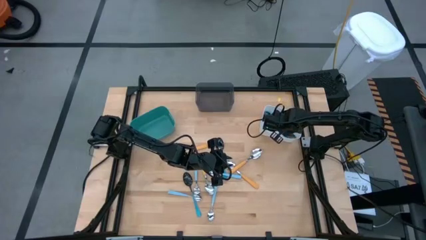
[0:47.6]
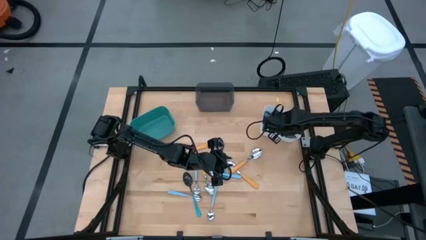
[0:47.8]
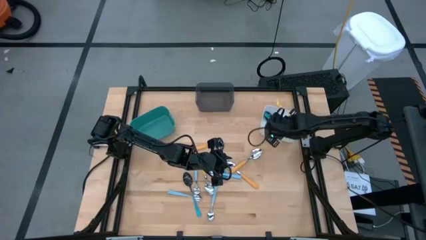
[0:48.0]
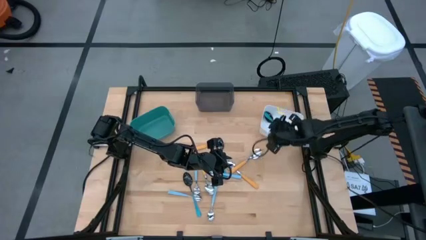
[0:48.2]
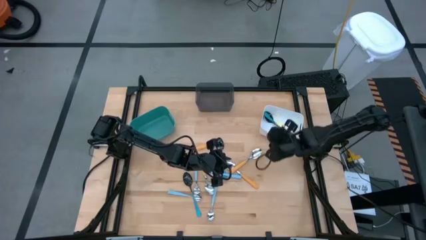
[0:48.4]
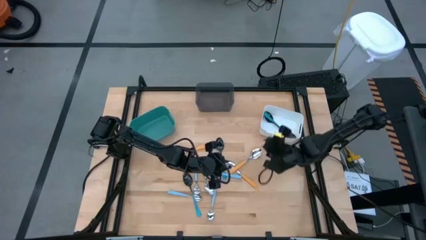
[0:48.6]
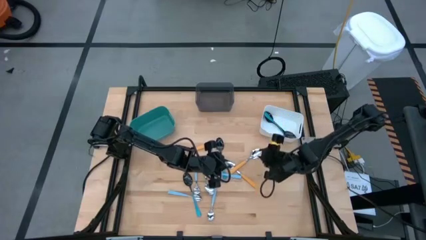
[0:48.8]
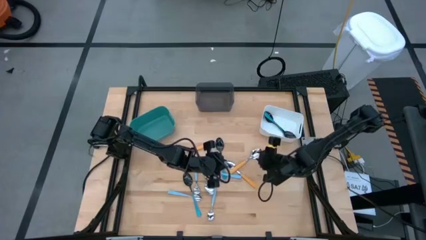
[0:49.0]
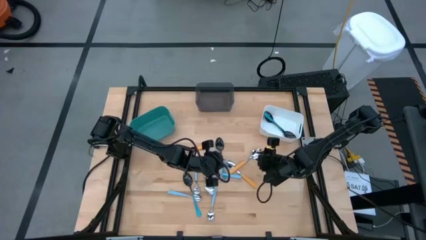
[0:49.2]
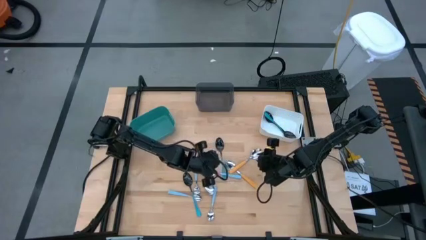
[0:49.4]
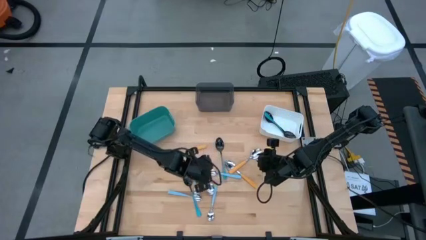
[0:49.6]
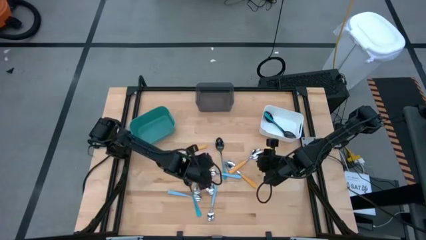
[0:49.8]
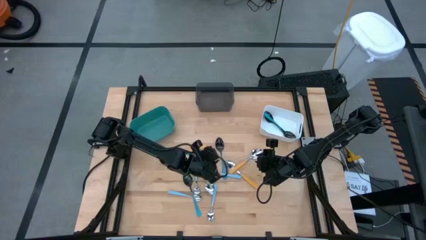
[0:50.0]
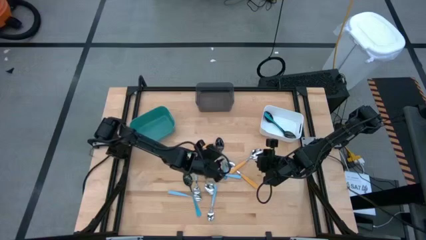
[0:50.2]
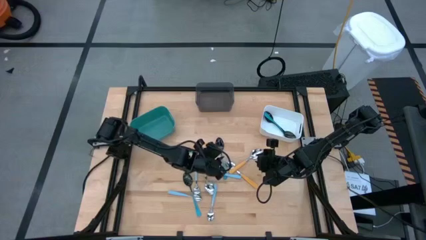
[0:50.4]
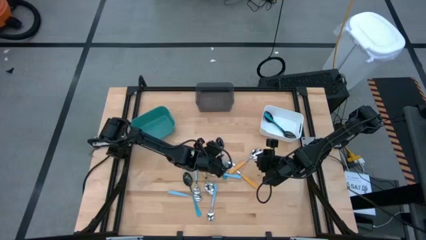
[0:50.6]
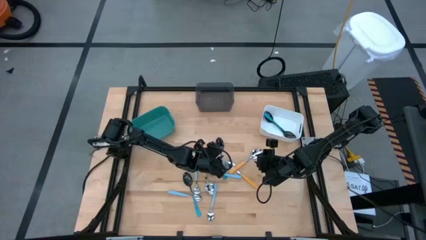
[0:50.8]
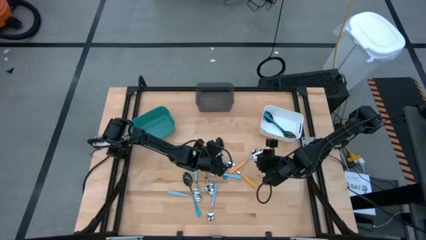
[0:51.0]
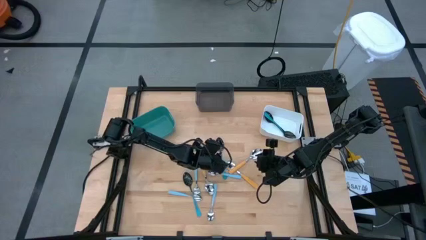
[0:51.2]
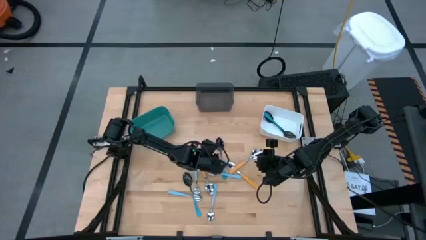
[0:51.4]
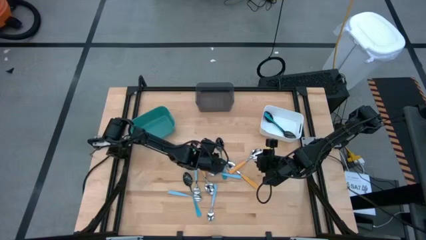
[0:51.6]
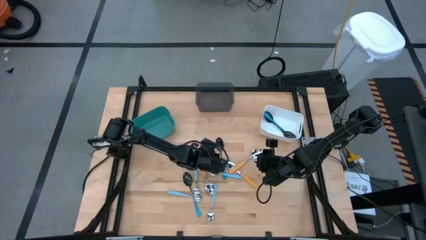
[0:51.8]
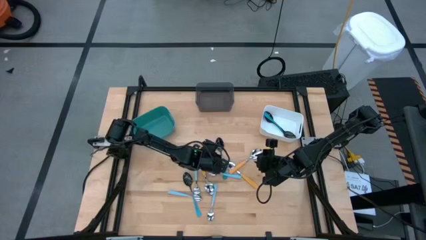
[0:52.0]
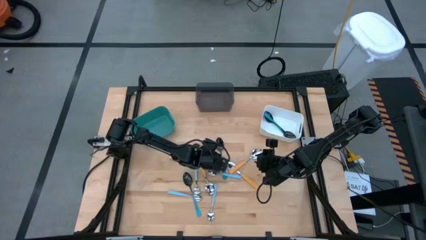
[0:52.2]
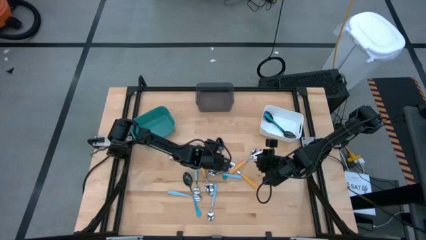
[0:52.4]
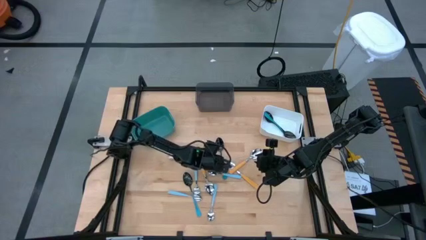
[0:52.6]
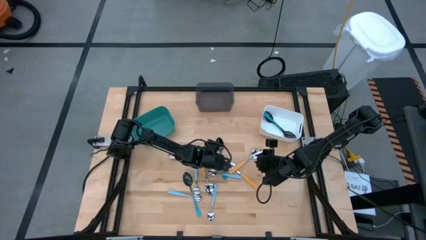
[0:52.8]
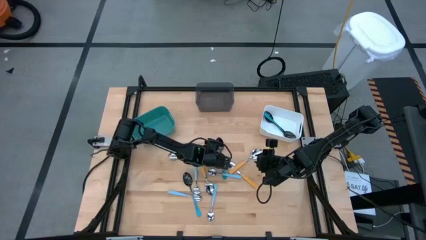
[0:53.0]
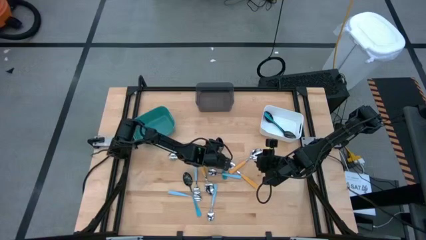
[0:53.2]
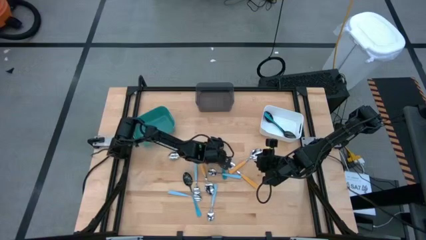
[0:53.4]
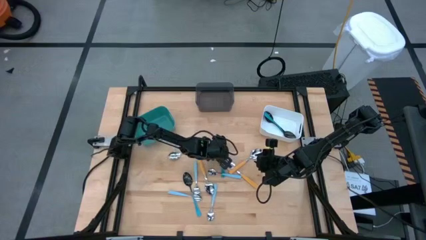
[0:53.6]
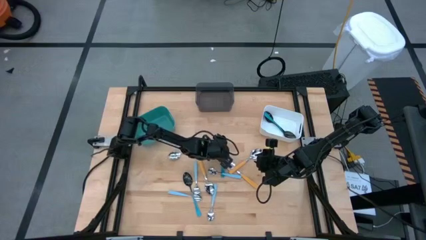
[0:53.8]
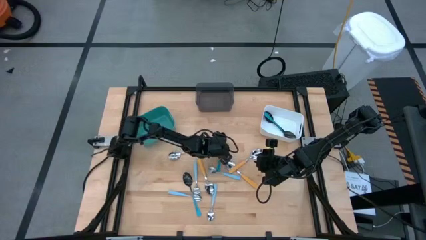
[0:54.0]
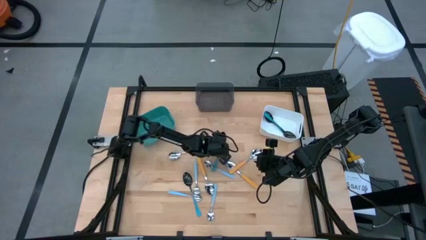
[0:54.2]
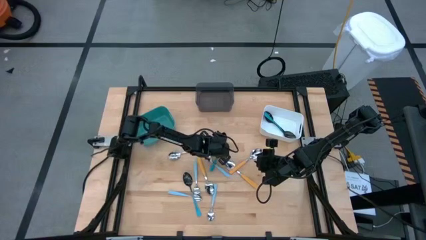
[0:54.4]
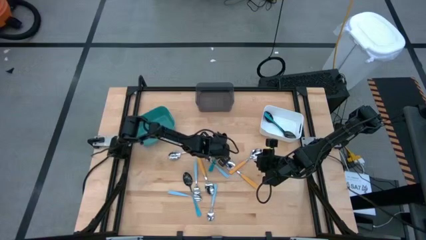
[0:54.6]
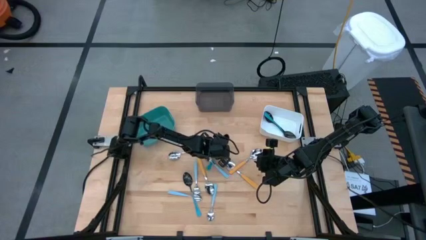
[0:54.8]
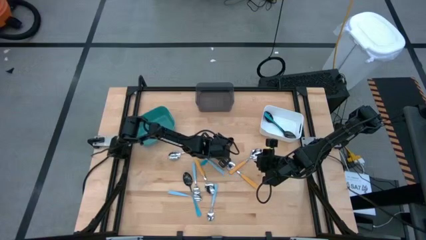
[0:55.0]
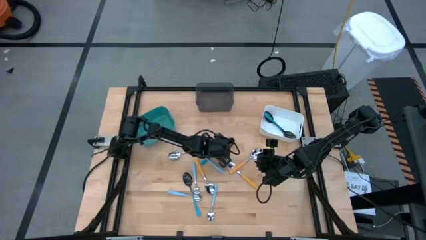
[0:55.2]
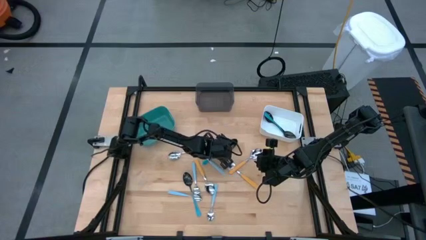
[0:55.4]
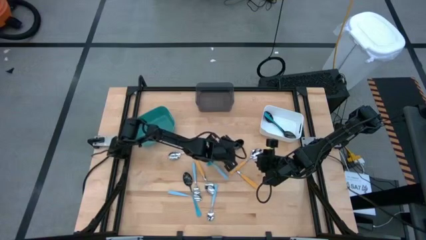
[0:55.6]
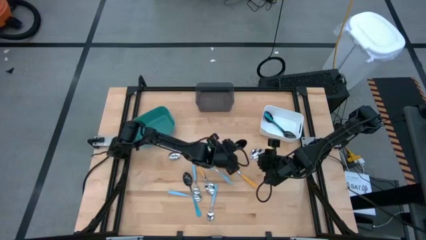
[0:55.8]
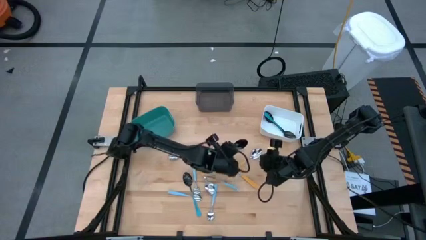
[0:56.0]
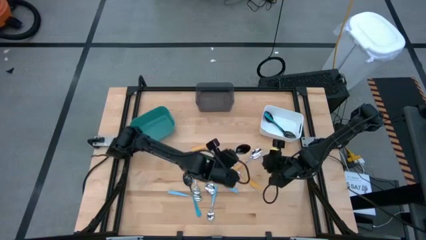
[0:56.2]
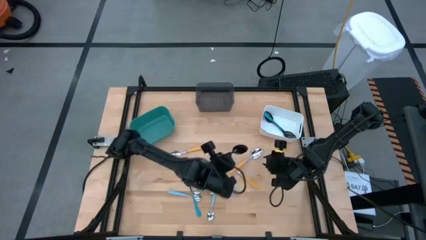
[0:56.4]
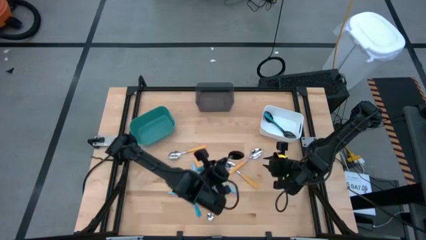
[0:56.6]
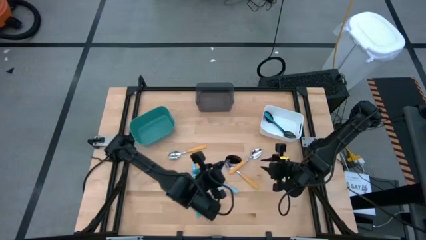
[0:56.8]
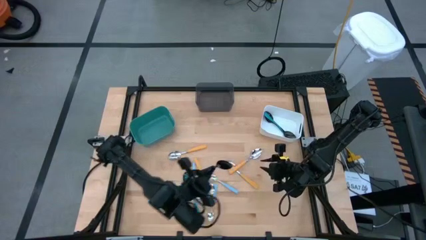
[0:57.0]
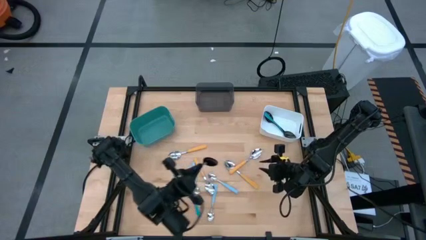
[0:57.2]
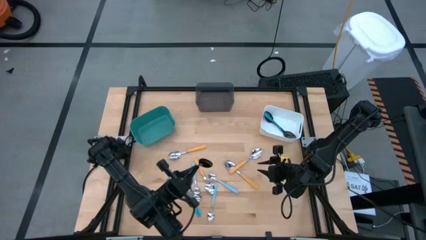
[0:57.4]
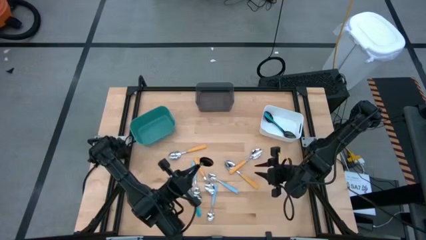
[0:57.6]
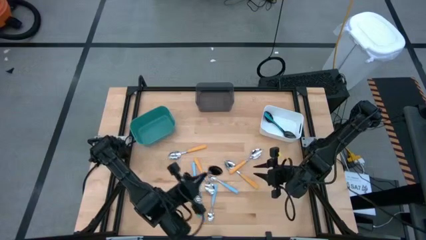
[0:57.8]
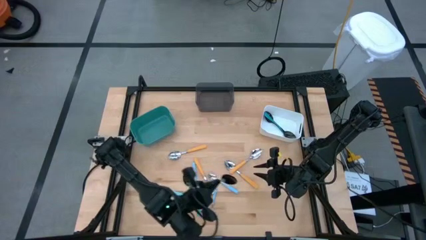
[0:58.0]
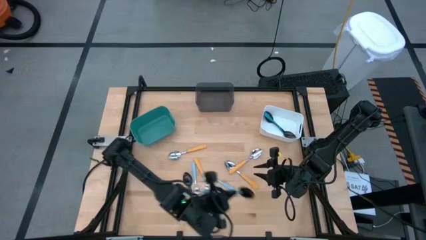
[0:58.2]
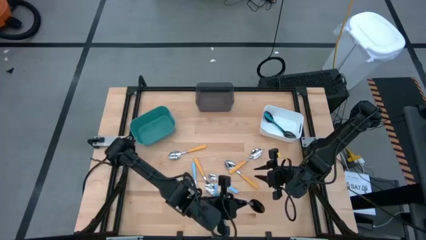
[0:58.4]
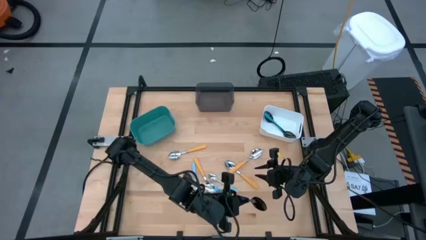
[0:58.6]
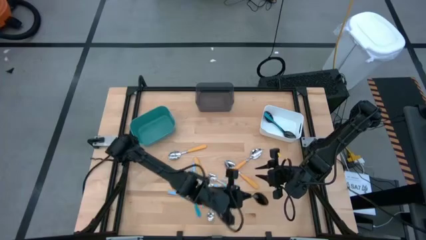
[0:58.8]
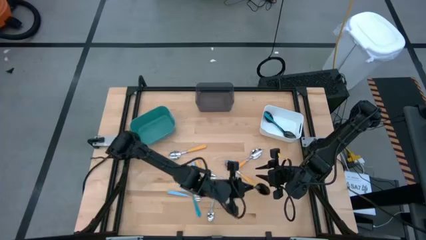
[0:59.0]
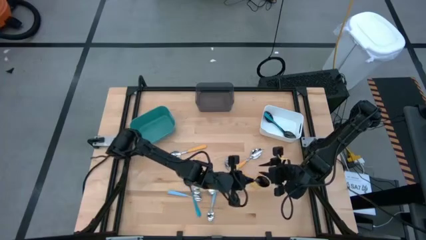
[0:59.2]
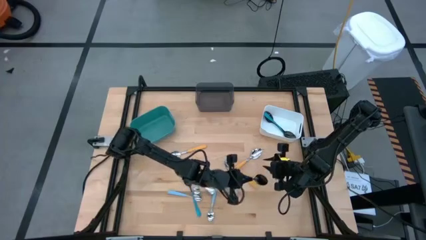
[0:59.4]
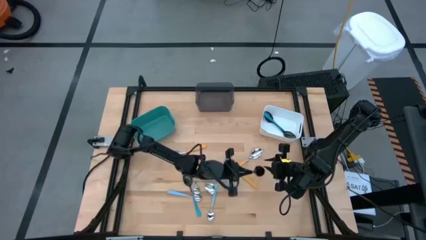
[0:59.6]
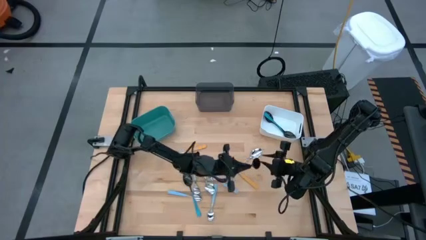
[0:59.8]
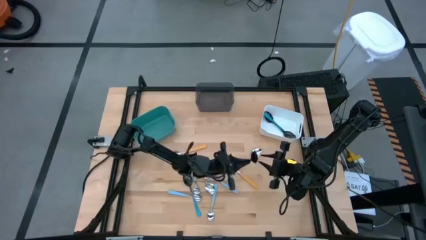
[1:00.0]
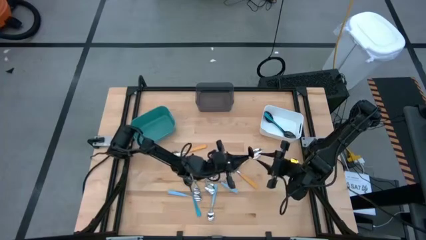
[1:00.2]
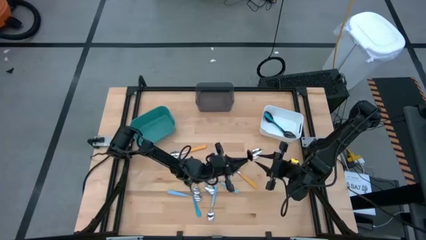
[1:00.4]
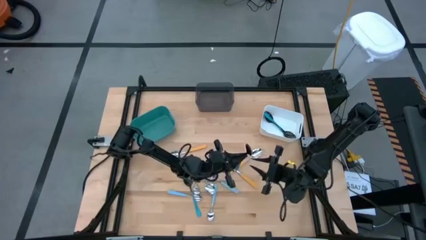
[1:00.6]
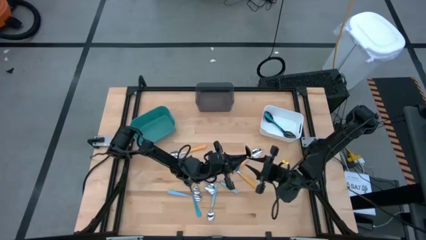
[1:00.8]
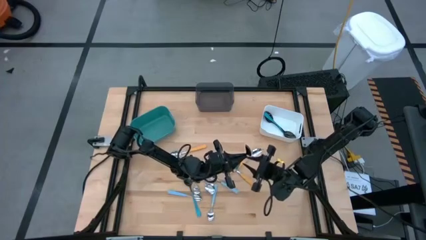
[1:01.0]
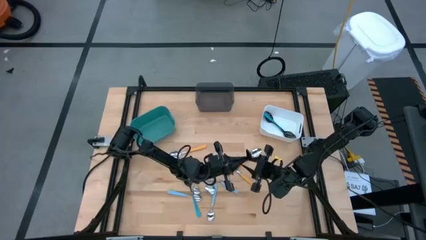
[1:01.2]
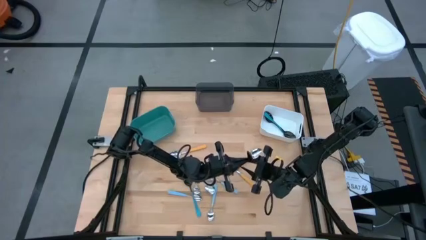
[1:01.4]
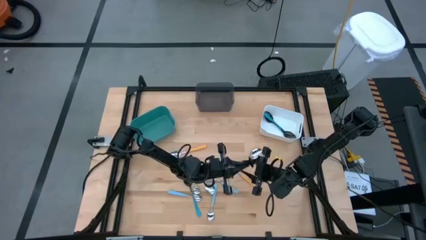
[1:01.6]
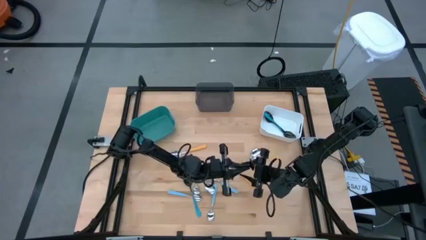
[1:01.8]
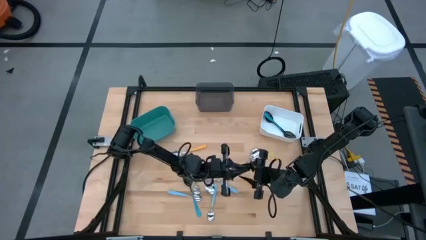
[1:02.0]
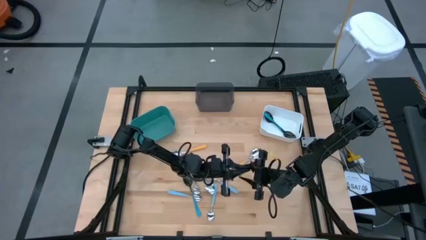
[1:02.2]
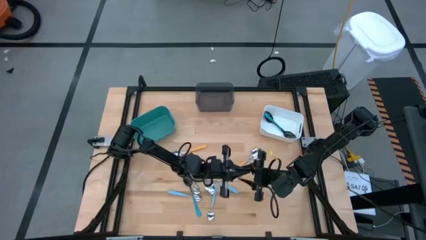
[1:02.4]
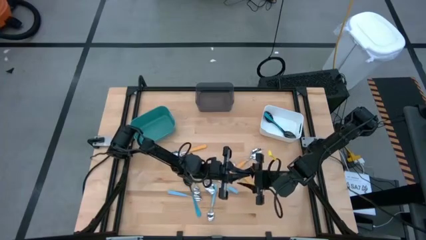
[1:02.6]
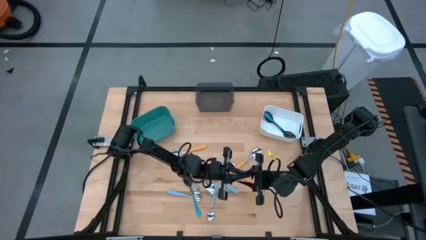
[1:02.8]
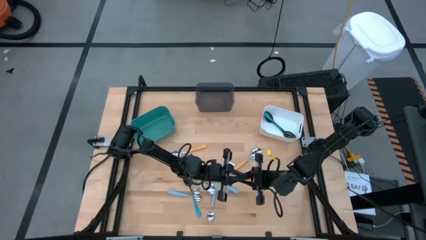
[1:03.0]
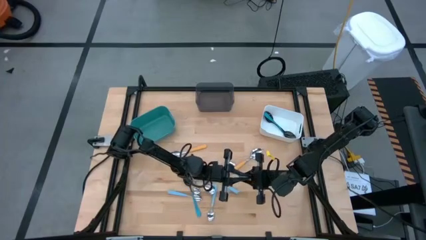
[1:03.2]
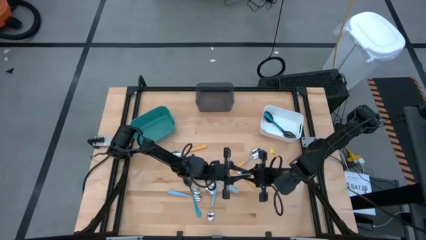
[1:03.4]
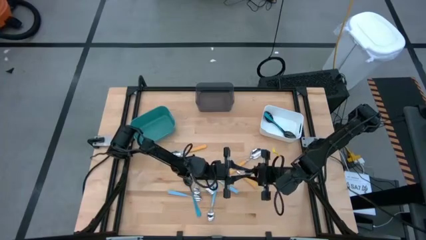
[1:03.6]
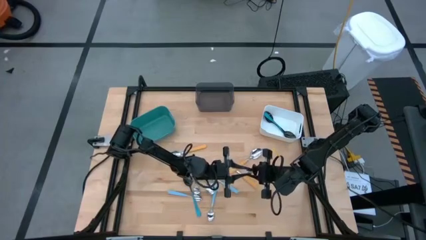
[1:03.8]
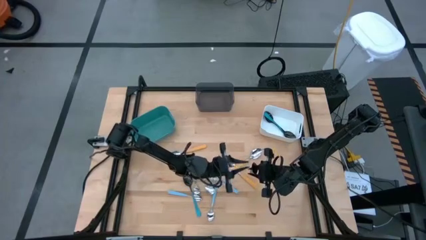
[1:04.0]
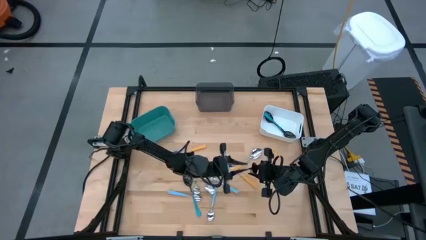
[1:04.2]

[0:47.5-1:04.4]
Task: Sort silverware by color (type)
Put the blue spoon into the white bin
